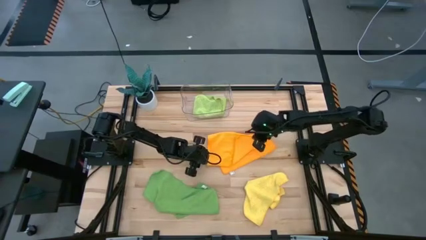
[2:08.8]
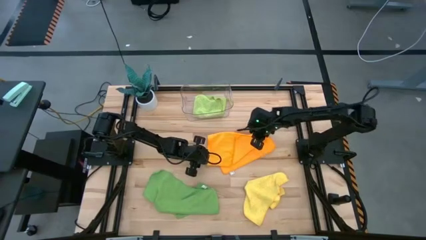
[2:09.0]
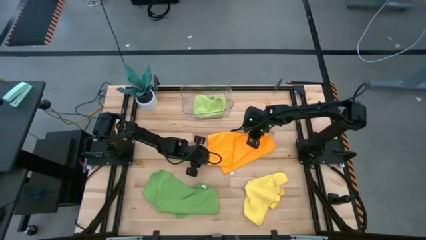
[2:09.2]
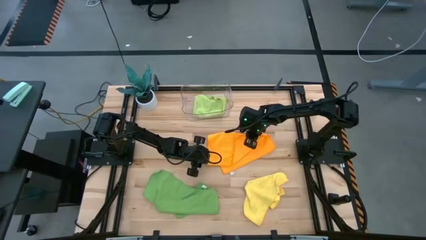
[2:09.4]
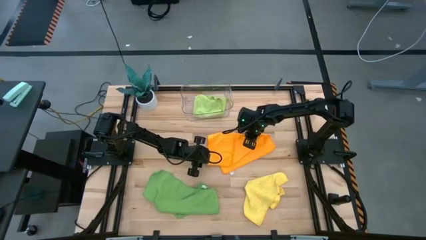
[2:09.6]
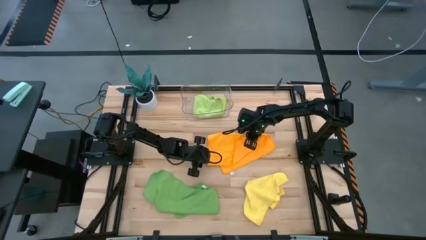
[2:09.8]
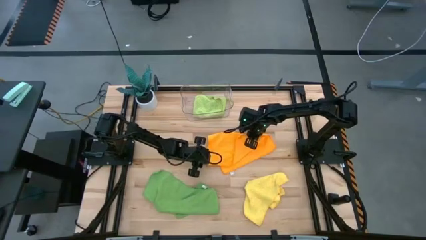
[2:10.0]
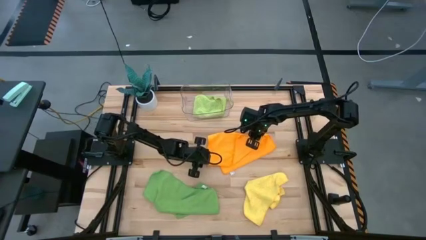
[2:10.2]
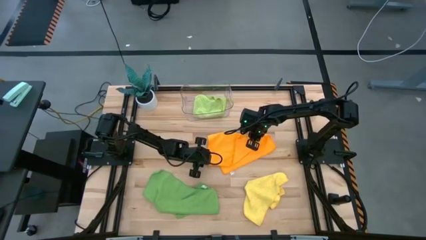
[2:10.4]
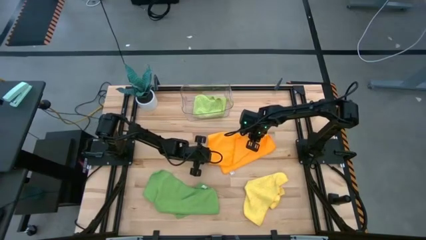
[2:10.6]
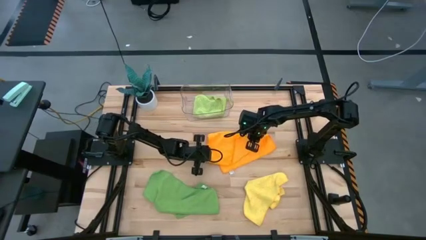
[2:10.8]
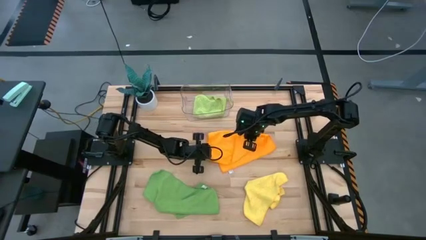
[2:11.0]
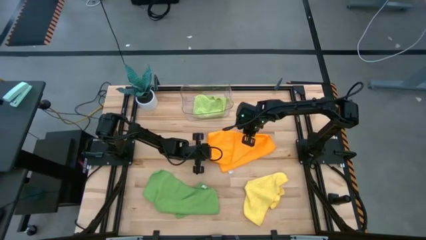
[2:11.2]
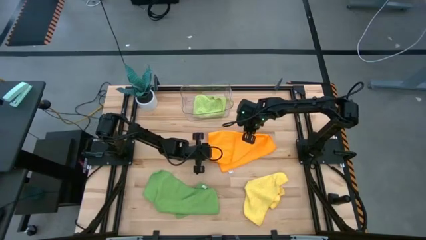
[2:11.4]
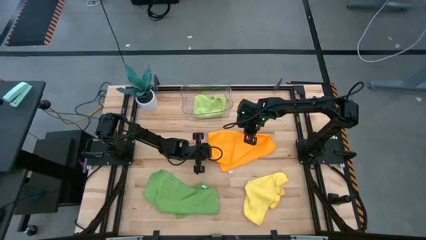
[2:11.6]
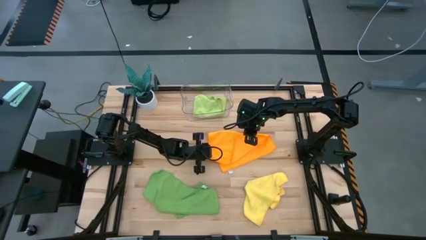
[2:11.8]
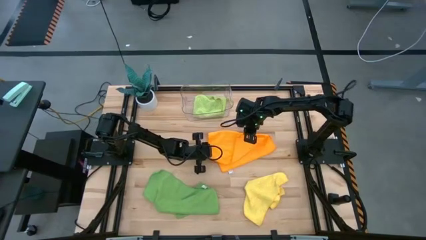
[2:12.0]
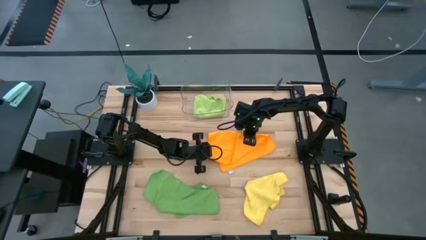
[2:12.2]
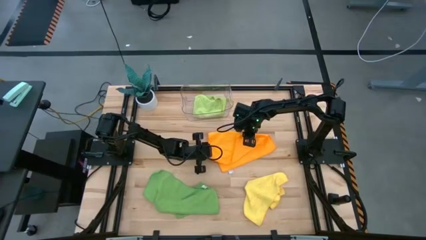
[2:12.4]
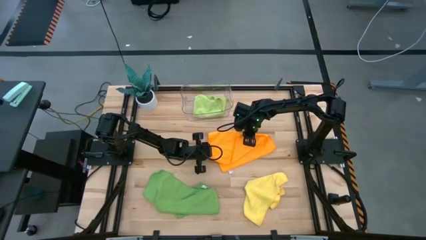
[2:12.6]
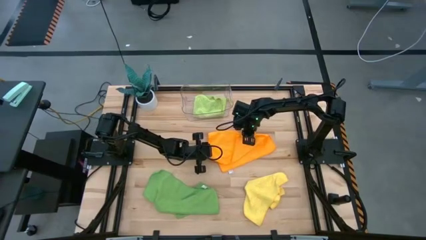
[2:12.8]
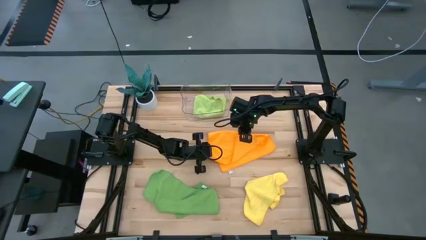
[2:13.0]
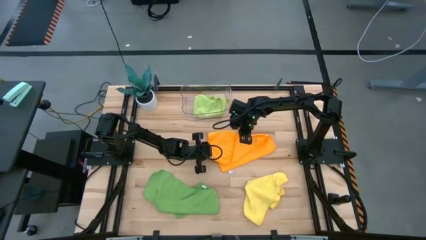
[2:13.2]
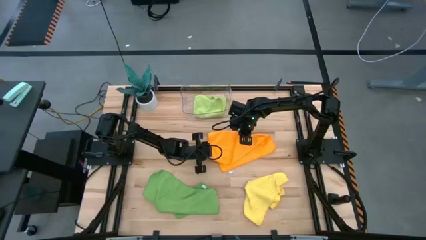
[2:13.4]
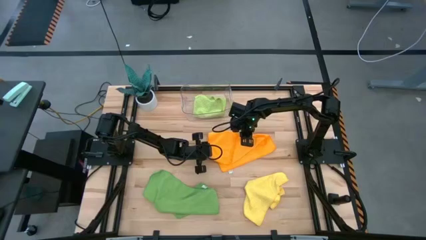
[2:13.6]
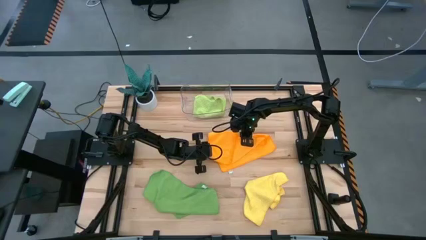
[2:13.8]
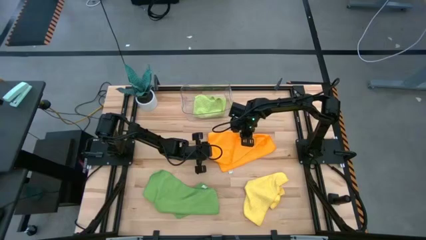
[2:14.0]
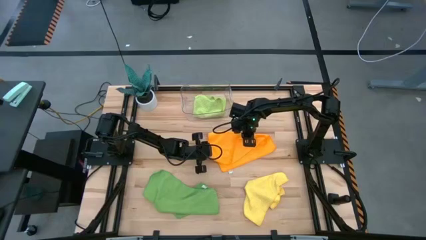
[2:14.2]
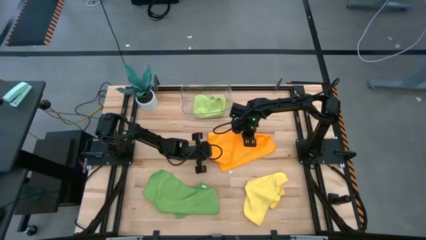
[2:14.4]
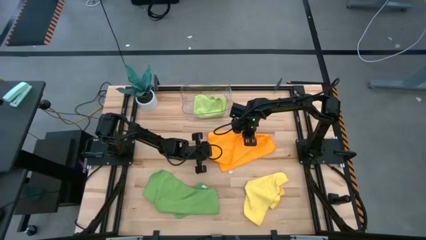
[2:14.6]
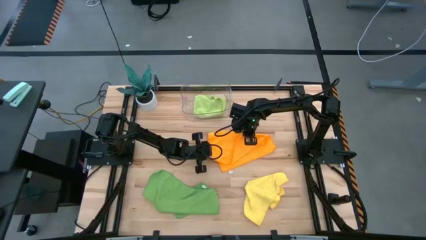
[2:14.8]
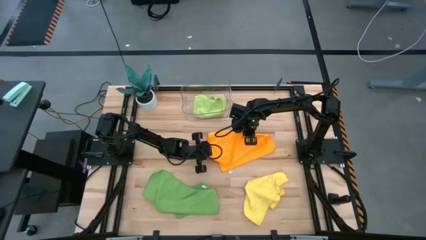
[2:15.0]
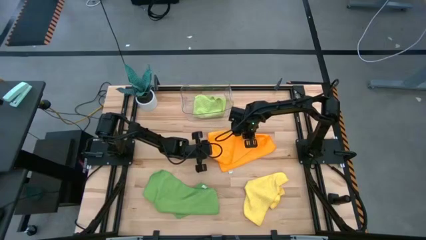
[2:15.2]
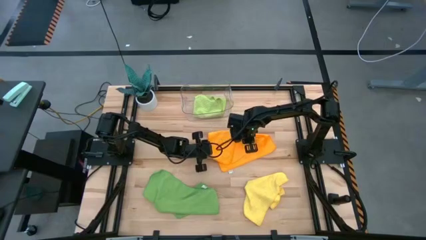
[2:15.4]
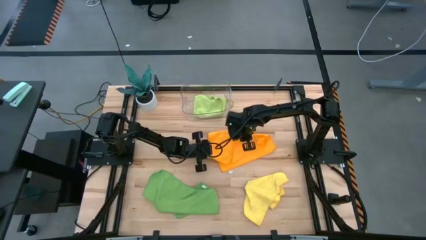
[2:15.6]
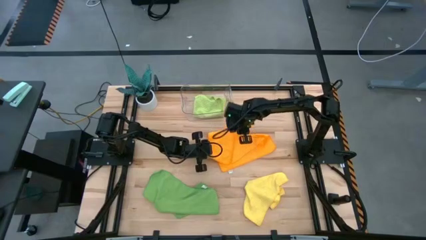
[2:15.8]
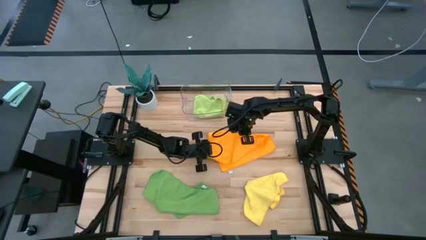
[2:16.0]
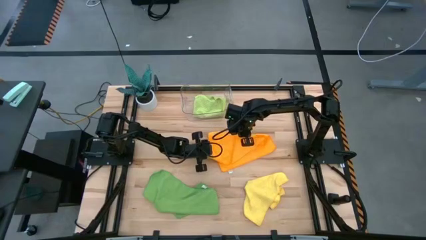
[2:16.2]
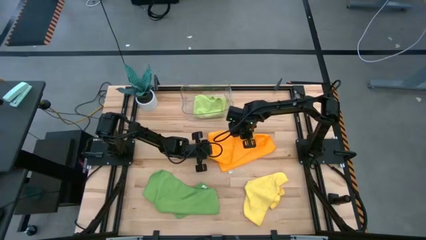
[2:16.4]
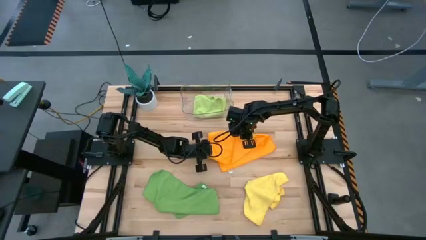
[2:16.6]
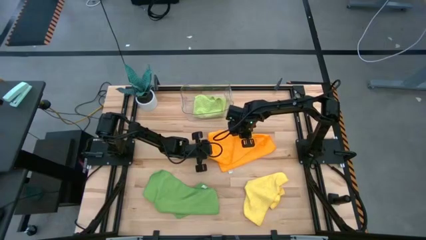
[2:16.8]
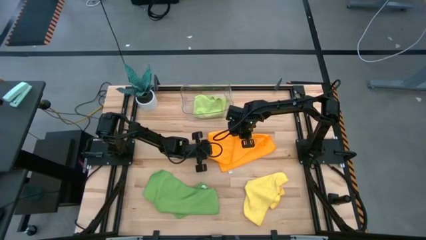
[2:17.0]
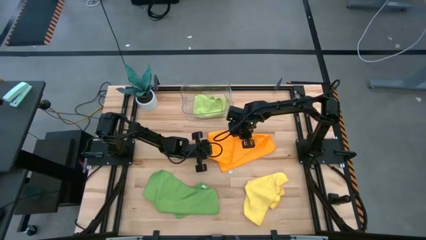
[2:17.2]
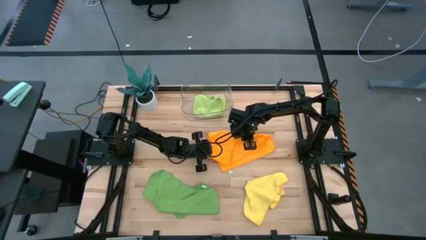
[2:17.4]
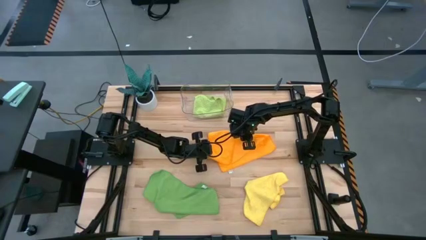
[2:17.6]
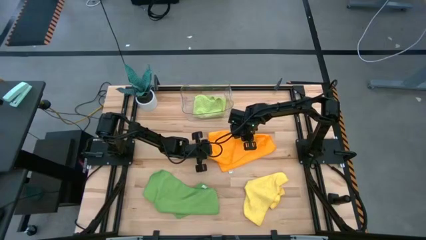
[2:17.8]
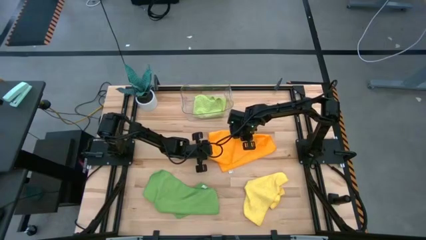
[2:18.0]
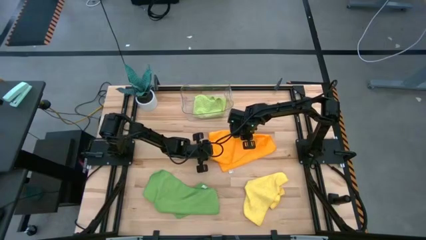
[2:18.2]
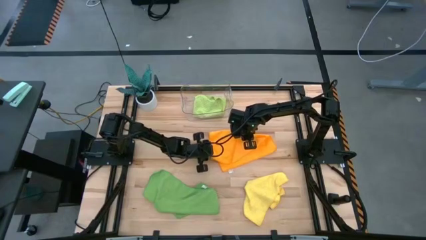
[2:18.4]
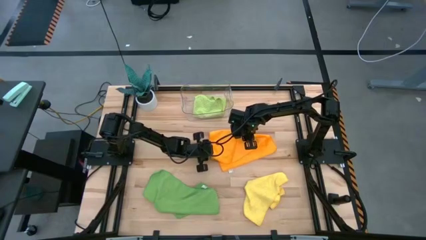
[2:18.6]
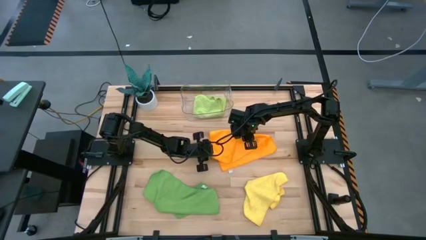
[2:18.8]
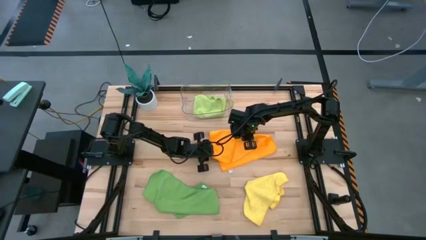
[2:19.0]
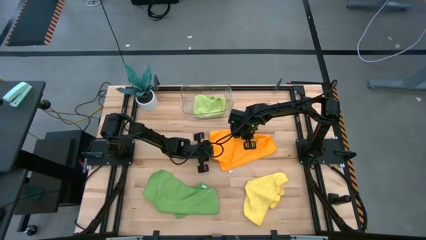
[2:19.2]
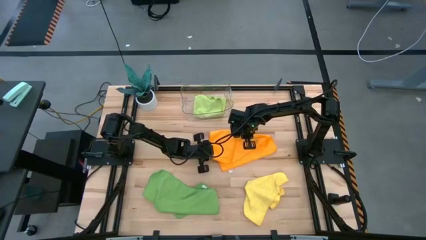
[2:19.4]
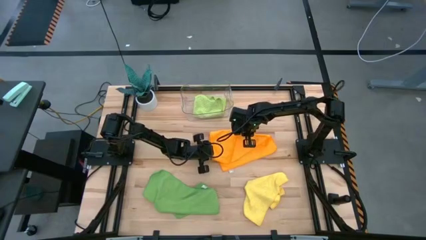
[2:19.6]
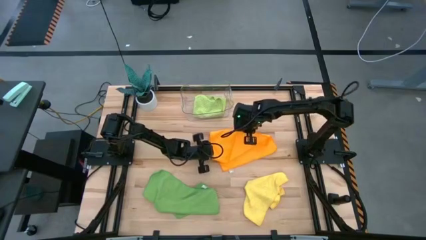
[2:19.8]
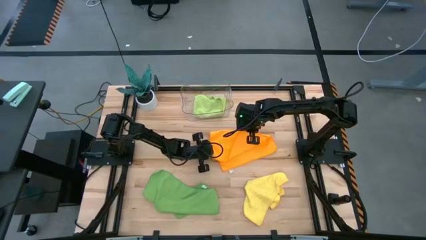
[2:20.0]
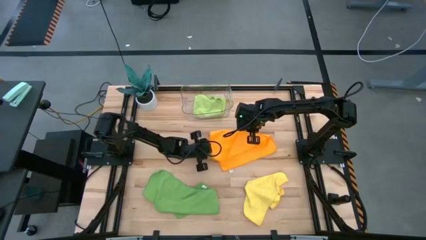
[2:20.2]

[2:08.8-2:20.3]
Task: Fold microfiber towels
Fold the orange microfiber cloth
